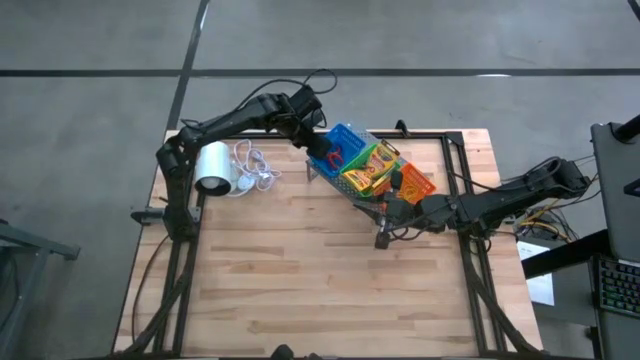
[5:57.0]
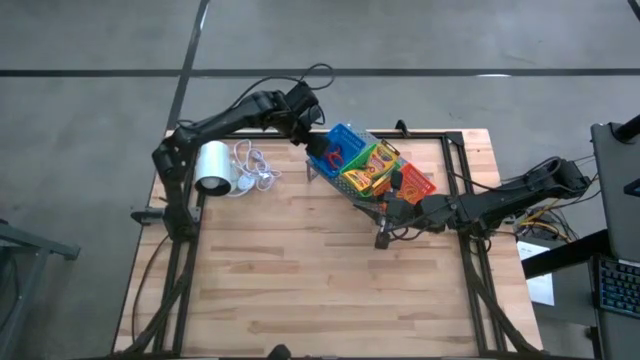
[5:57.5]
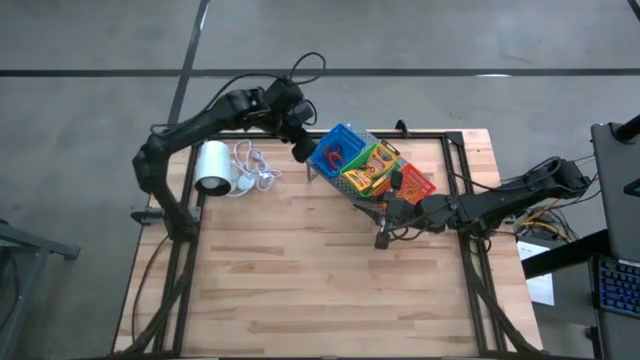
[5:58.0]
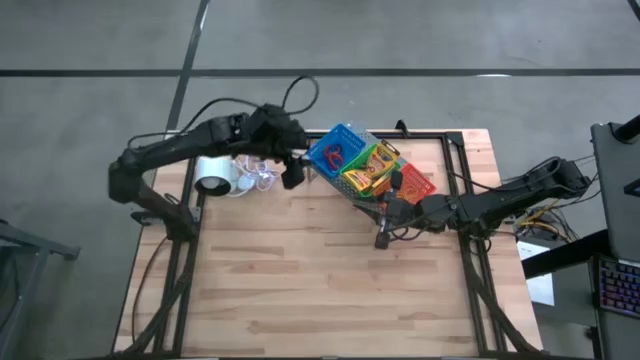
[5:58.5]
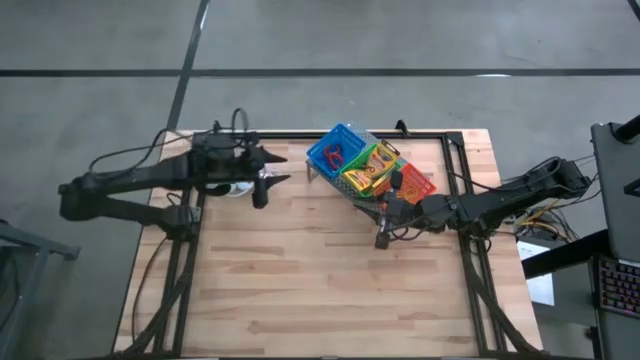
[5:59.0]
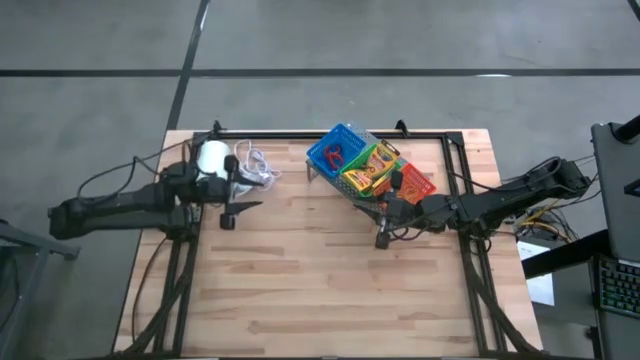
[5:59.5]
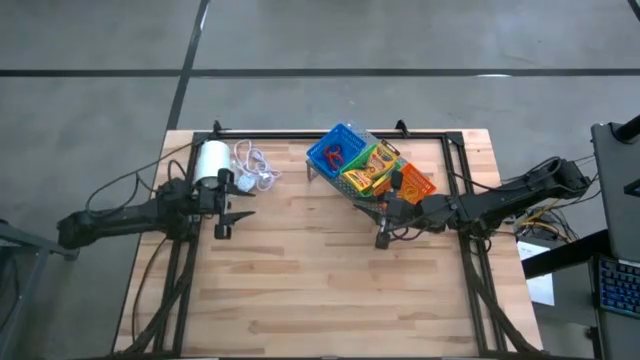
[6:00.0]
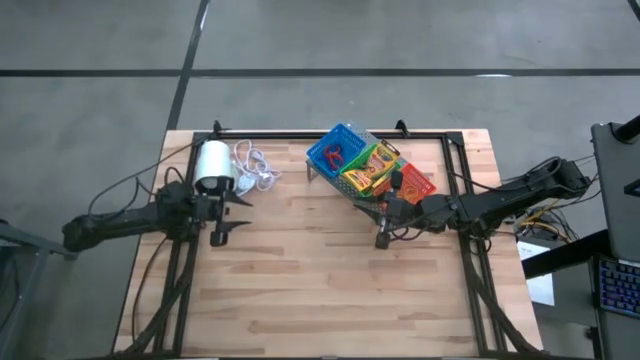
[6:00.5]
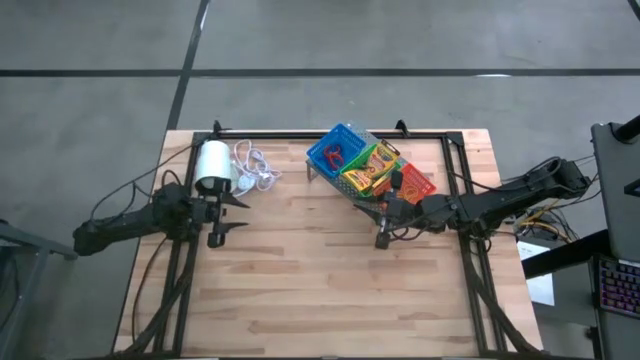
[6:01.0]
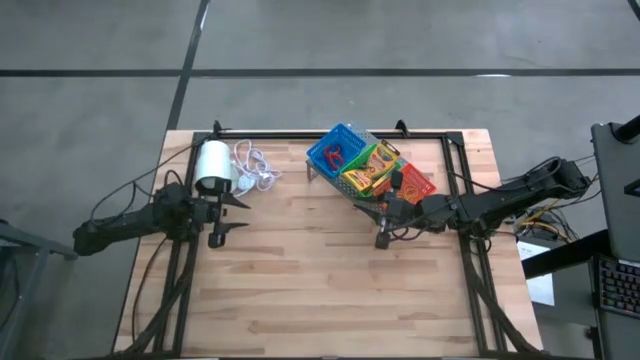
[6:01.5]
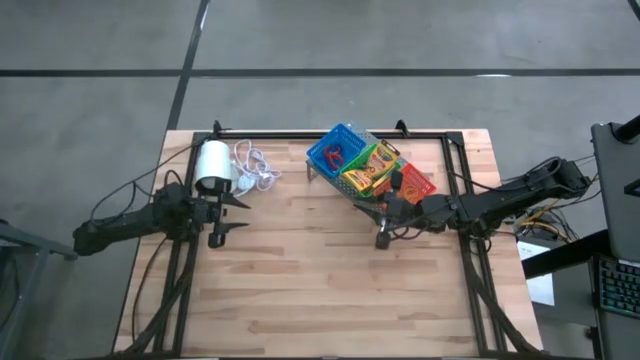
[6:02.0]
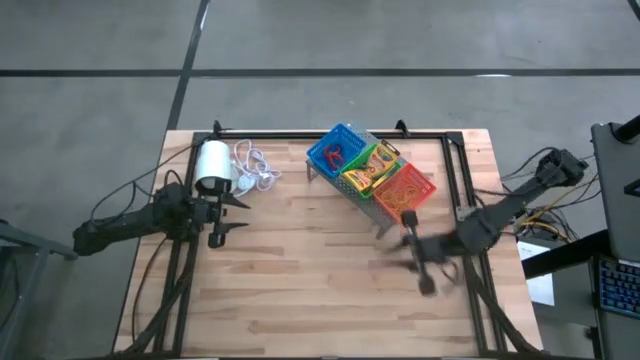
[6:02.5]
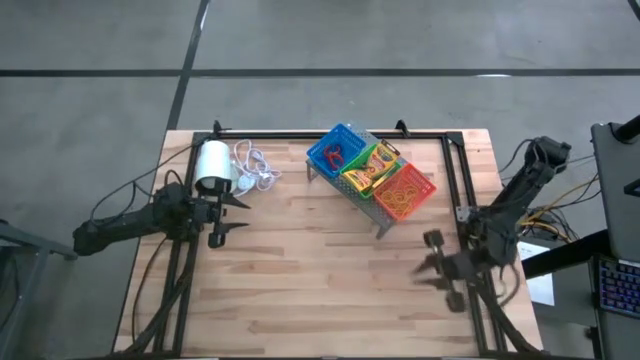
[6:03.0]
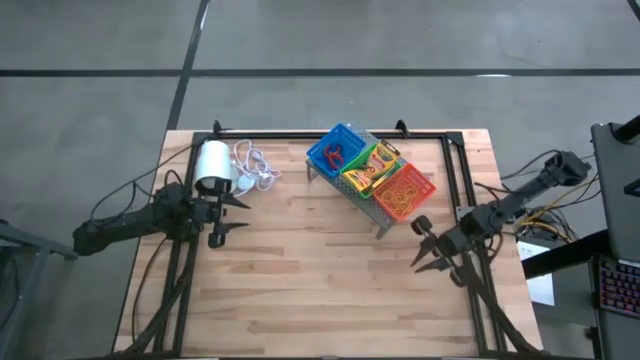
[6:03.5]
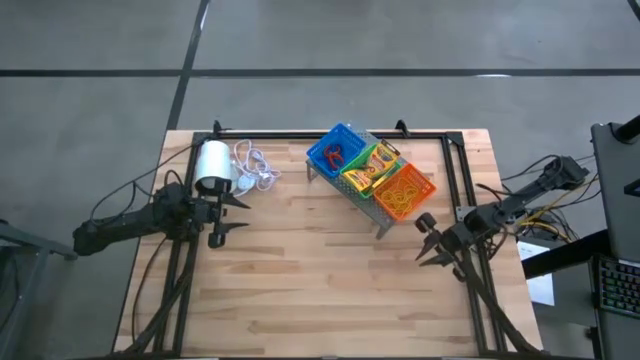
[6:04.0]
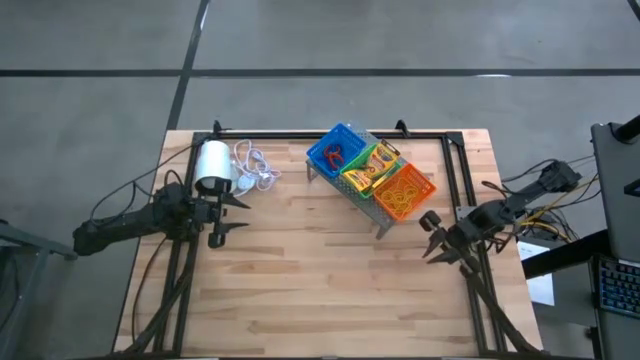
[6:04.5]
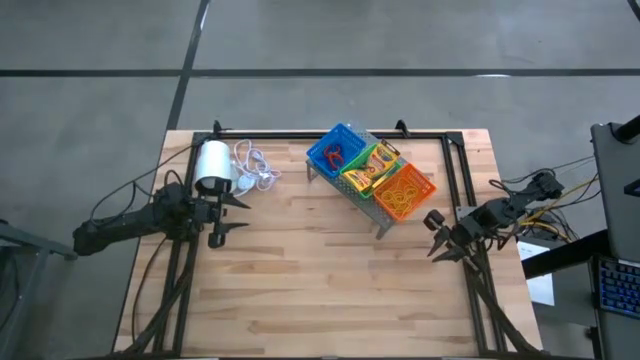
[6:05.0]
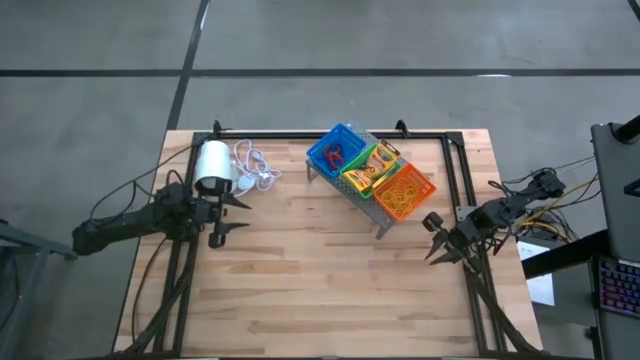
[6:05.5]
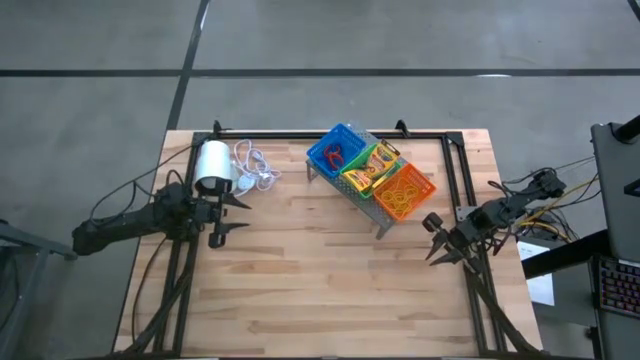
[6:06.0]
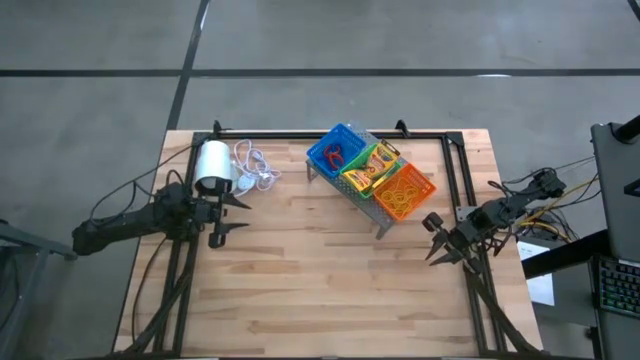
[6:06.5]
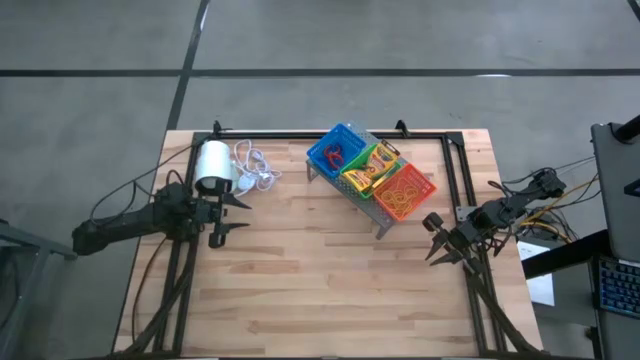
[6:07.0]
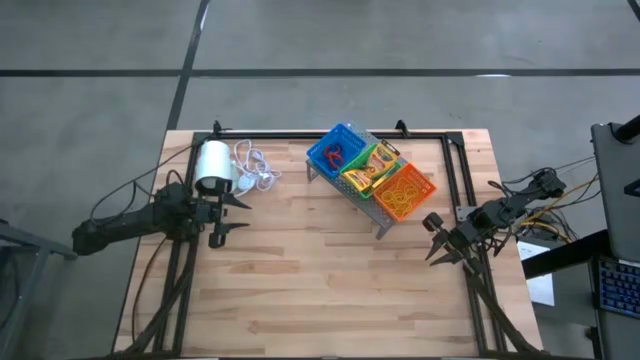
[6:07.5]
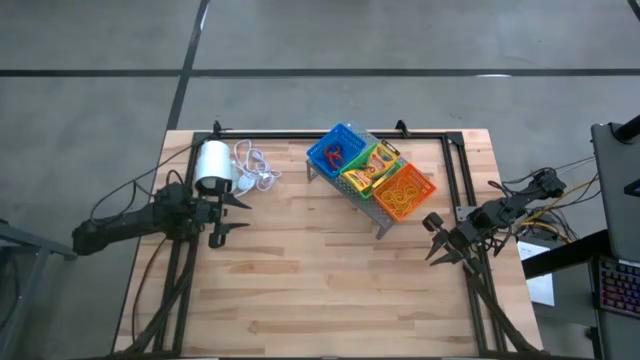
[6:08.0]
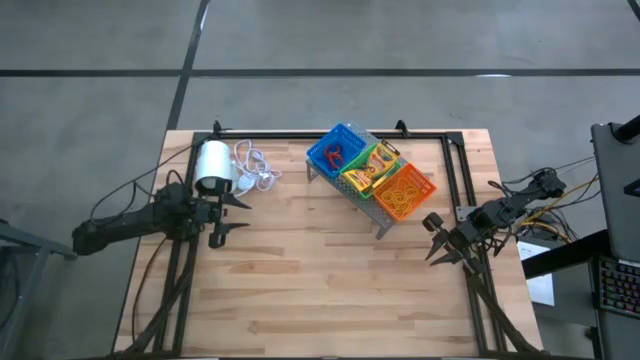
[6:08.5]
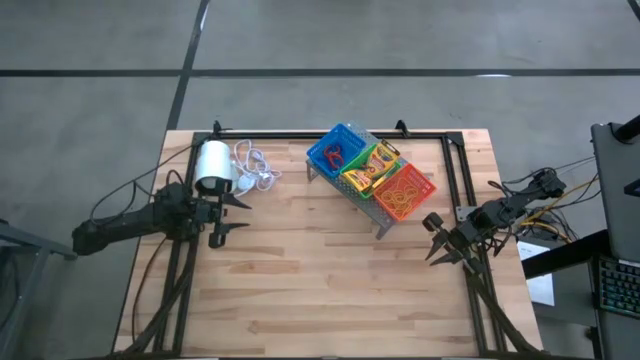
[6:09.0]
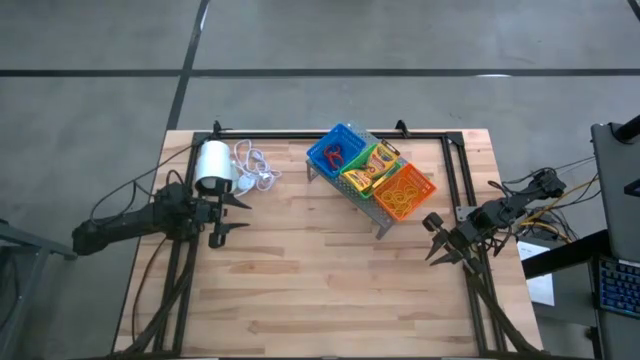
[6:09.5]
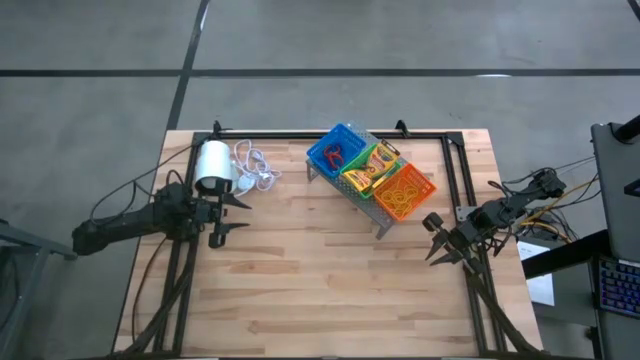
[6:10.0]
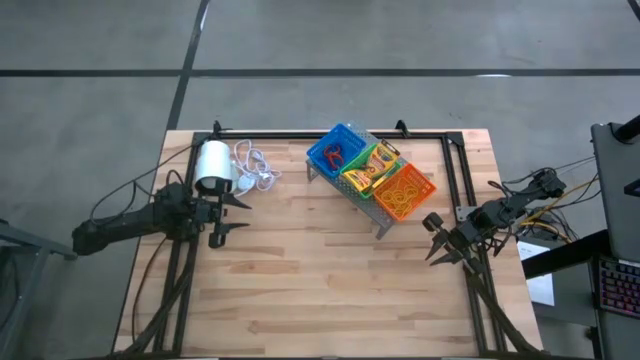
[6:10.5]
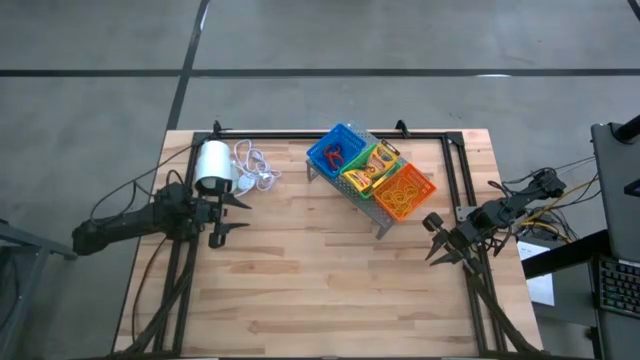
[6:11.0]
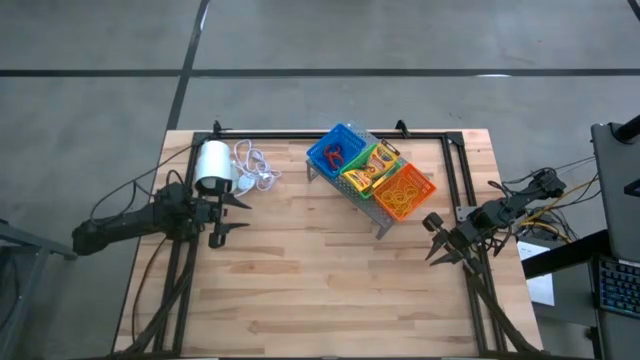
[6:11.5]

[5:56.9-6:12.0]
Task: Pick & Place Office Desk Supplies
Return to Home Position

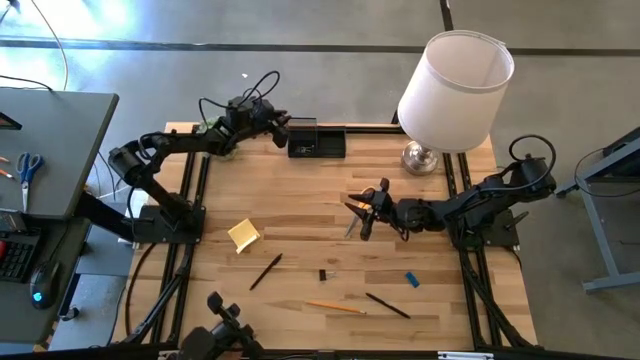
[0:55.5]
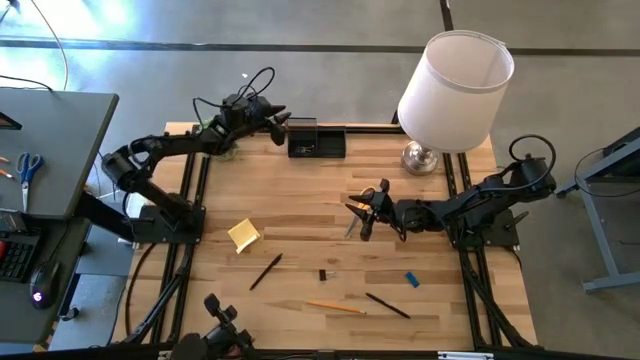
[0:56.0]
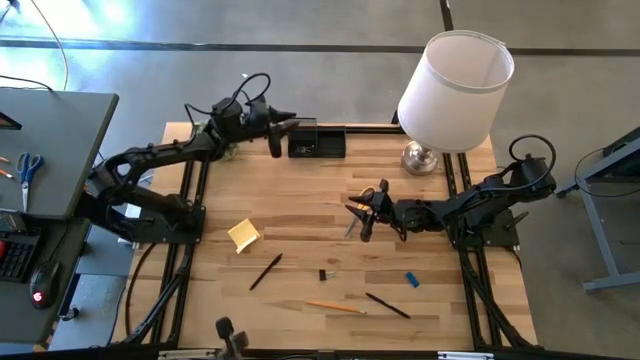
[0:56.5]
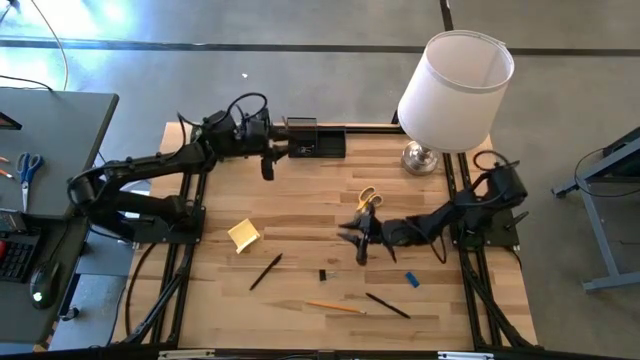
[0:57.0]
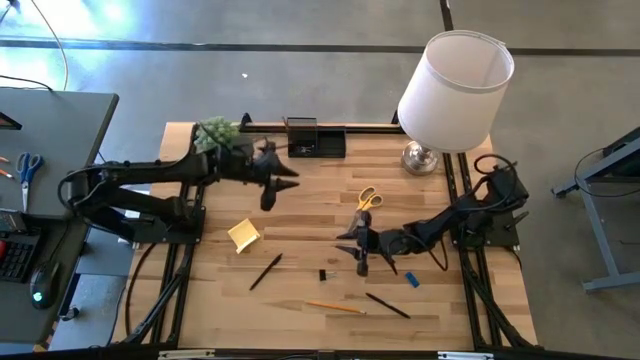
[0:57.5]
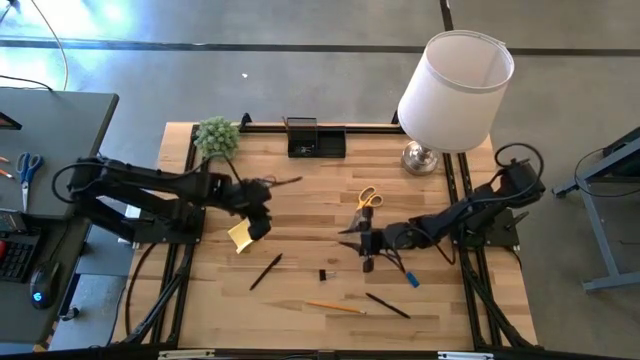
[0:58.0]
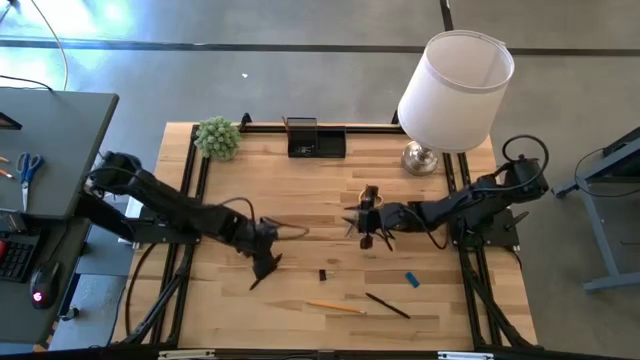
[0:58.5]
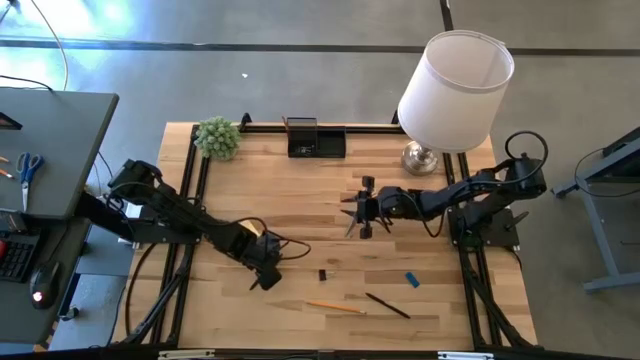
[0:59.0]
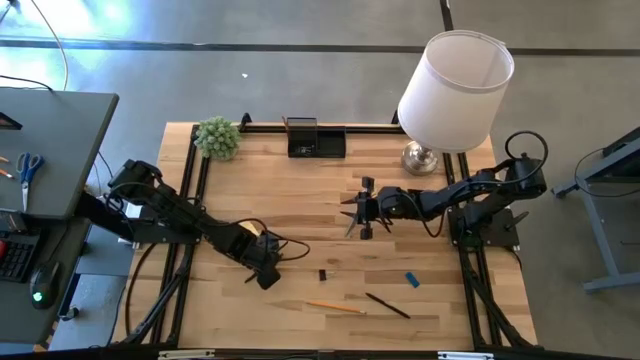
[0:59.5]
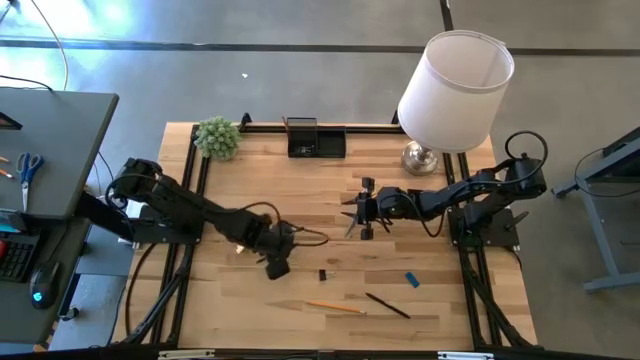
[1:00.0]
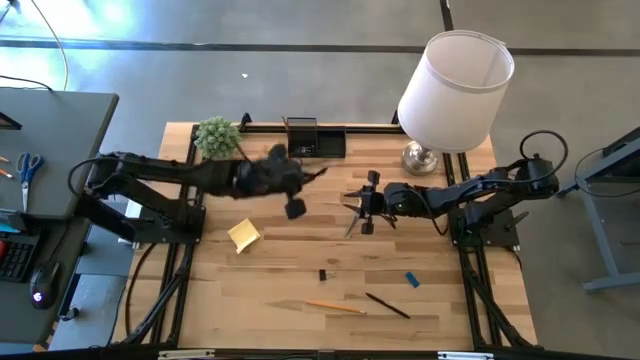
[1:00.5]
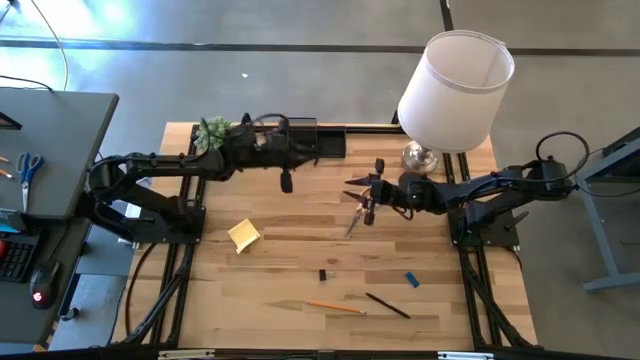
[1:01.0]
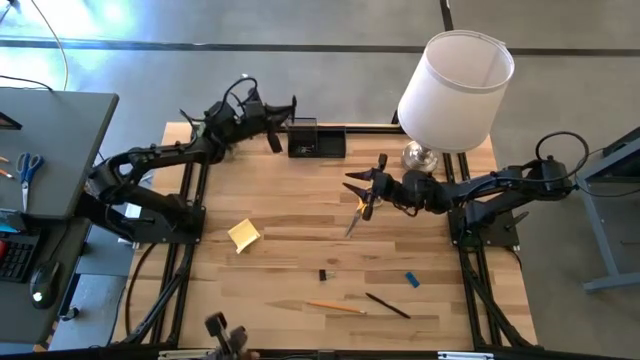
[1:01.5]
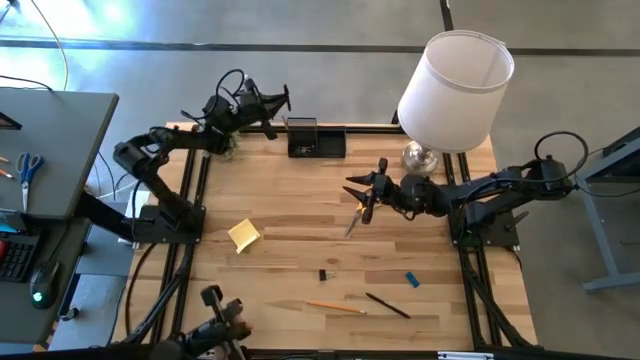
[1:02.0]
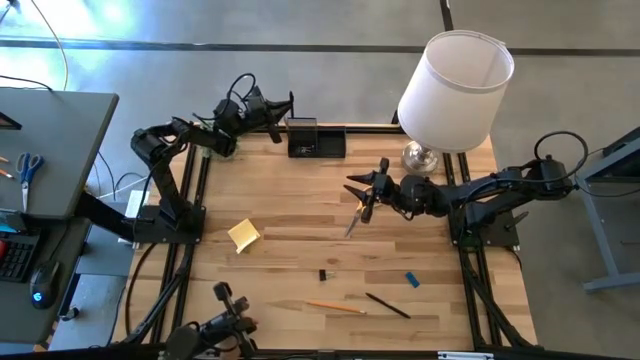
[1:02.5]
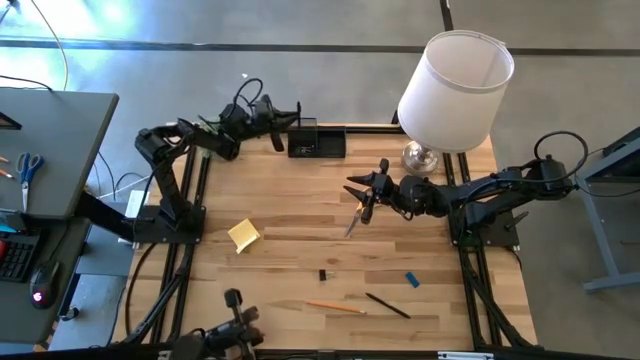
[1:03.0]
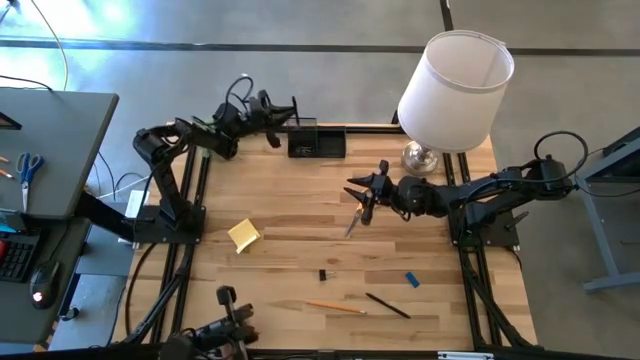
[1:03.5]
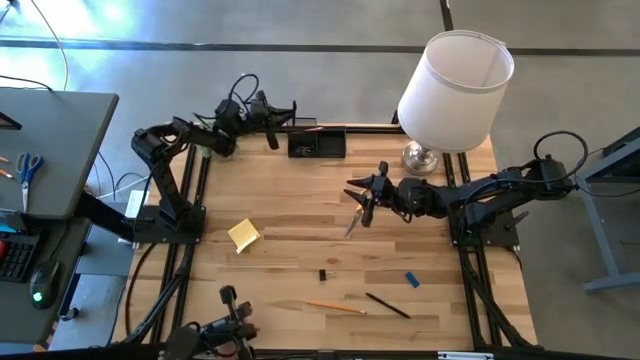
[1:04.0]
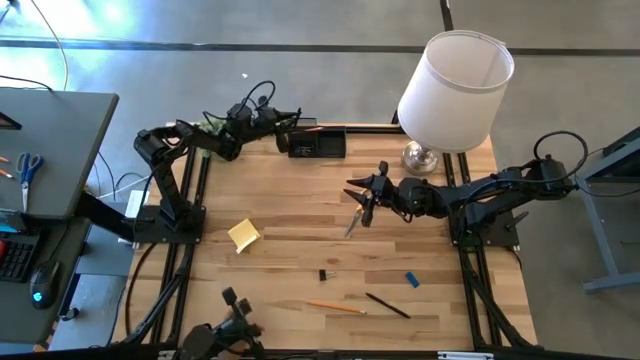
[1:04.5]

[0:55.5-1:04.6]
Task: Pick and place office supplies into organizer
Put the left black pen into the top left slot of the desk organizer
